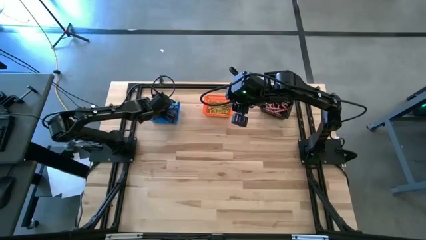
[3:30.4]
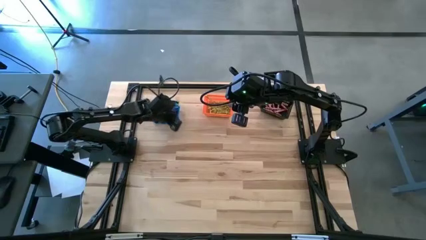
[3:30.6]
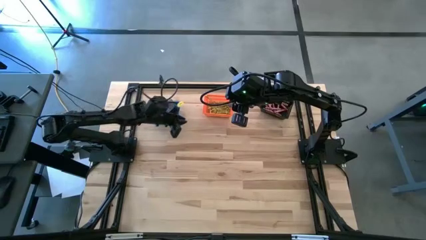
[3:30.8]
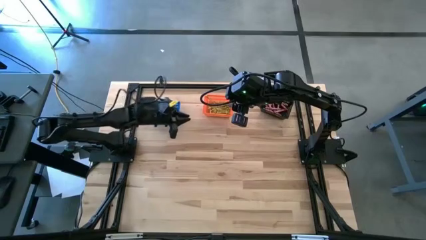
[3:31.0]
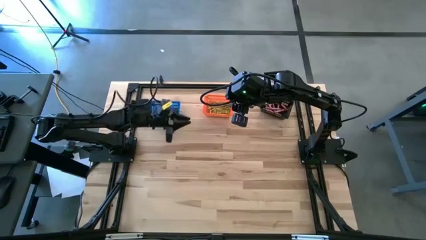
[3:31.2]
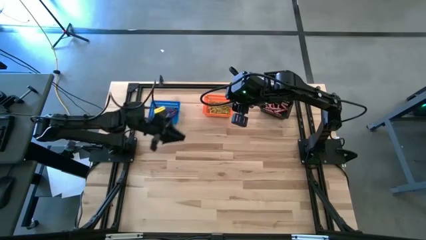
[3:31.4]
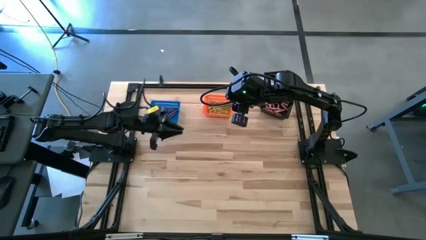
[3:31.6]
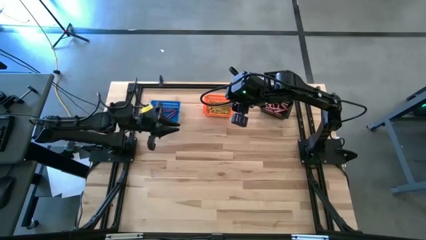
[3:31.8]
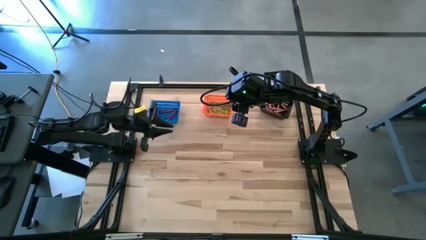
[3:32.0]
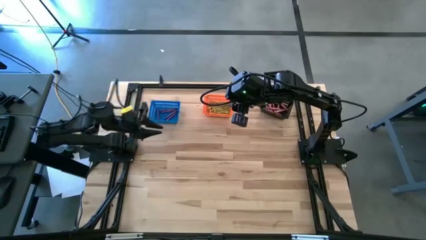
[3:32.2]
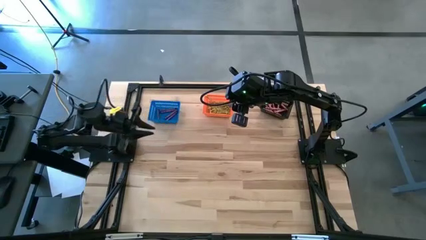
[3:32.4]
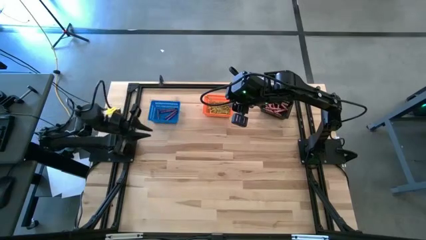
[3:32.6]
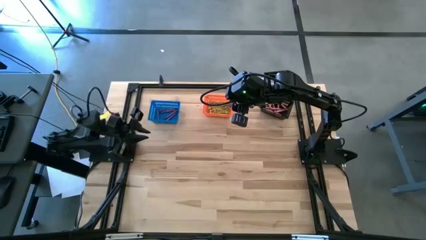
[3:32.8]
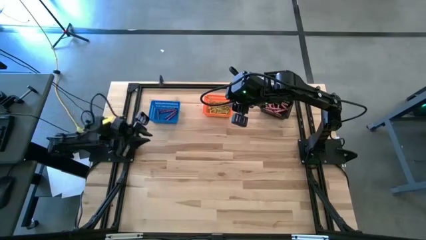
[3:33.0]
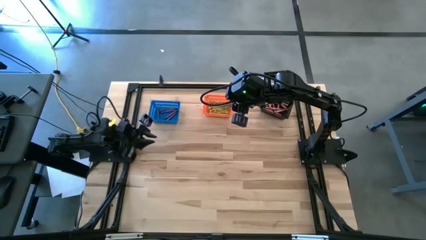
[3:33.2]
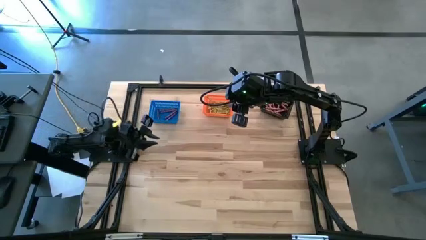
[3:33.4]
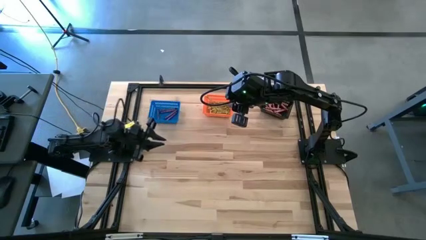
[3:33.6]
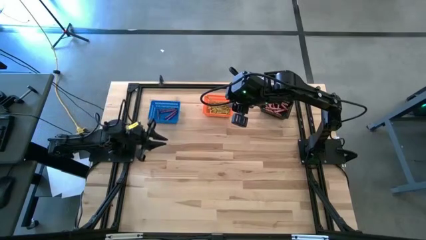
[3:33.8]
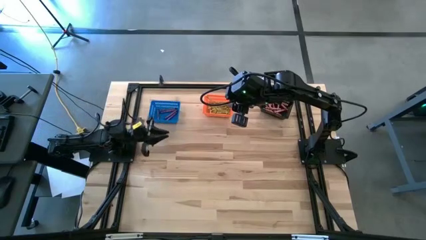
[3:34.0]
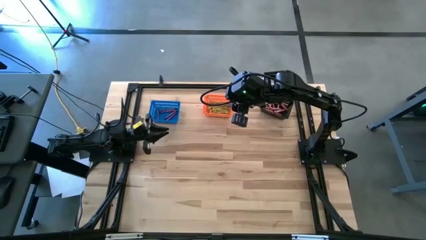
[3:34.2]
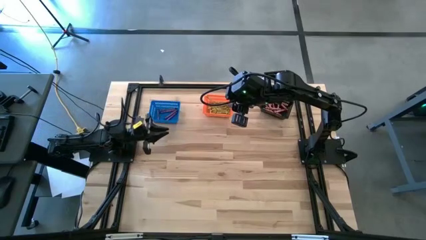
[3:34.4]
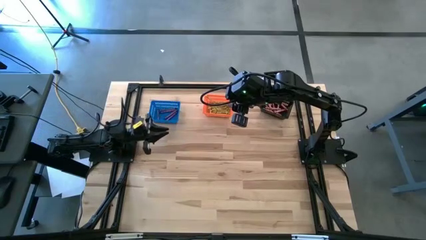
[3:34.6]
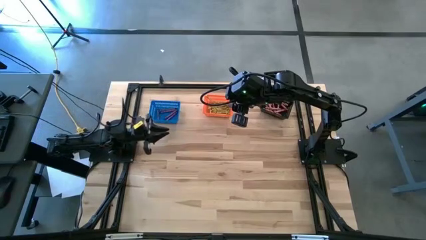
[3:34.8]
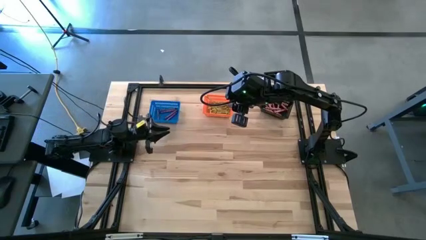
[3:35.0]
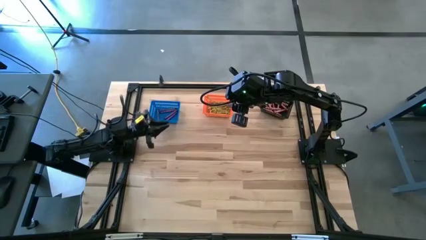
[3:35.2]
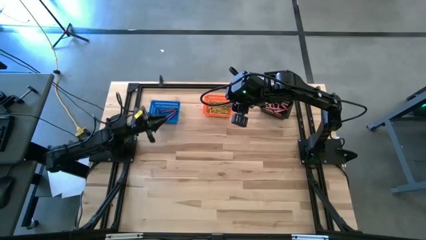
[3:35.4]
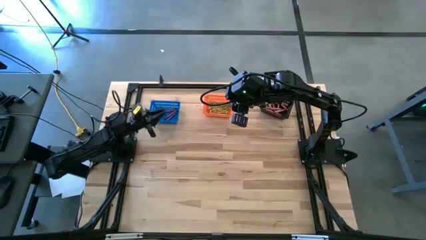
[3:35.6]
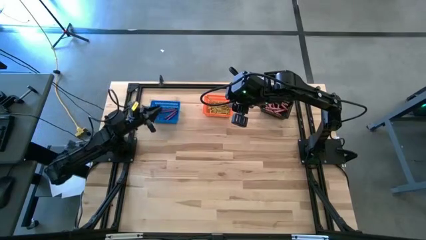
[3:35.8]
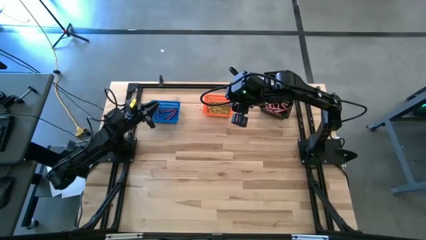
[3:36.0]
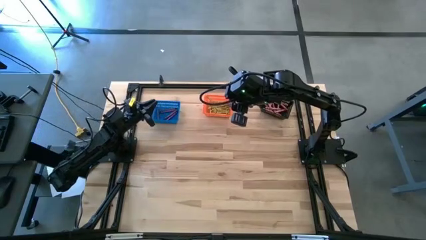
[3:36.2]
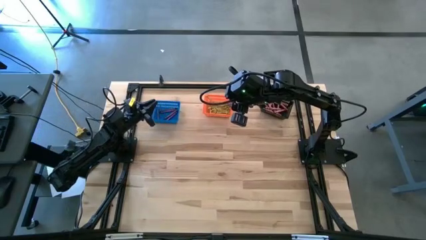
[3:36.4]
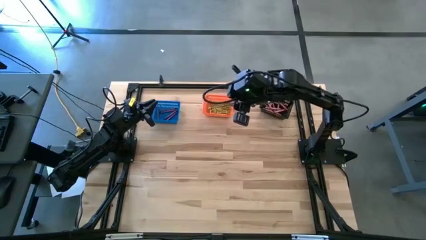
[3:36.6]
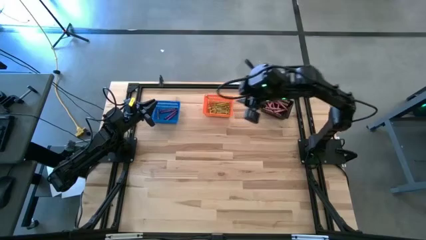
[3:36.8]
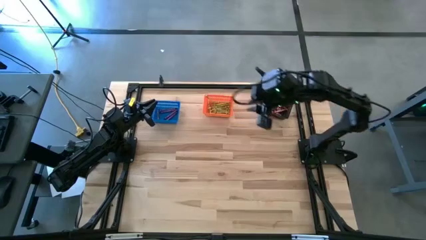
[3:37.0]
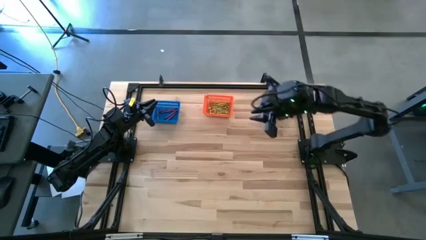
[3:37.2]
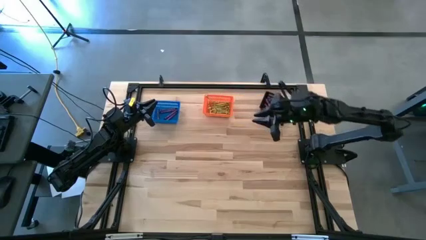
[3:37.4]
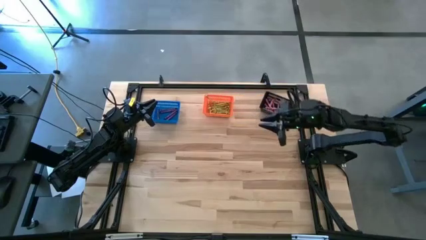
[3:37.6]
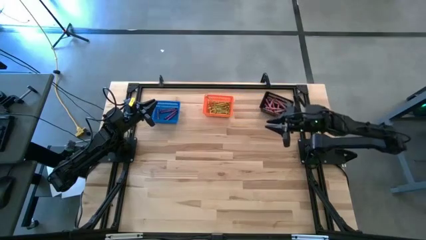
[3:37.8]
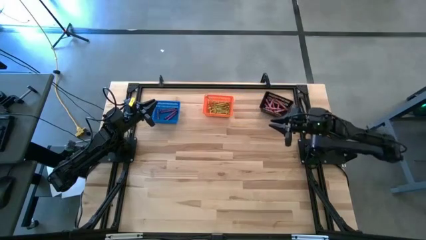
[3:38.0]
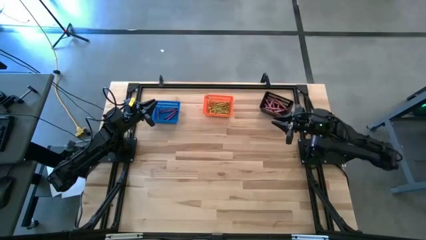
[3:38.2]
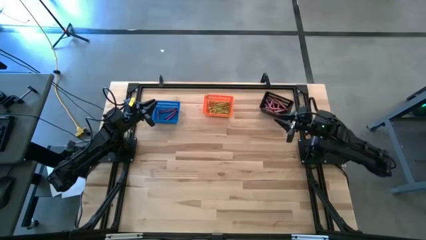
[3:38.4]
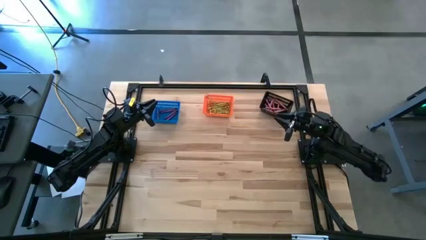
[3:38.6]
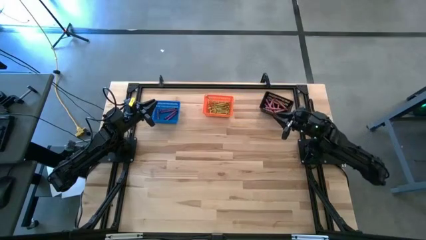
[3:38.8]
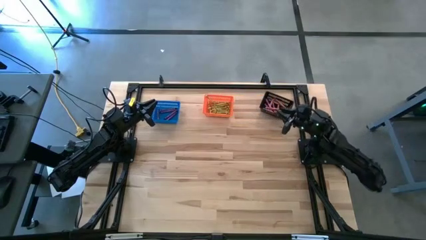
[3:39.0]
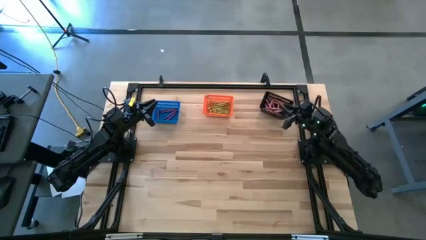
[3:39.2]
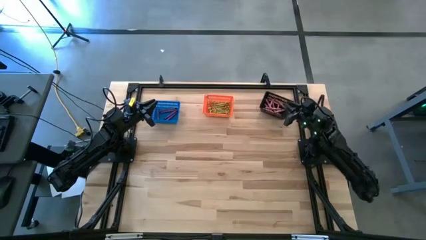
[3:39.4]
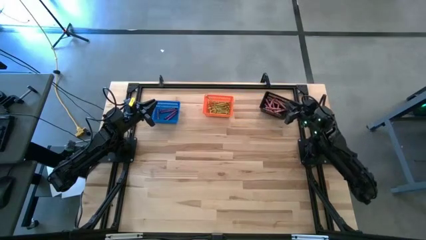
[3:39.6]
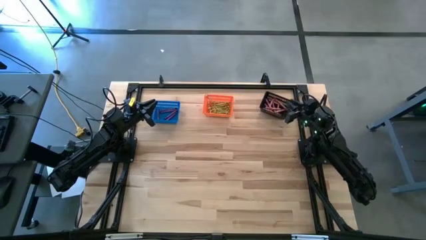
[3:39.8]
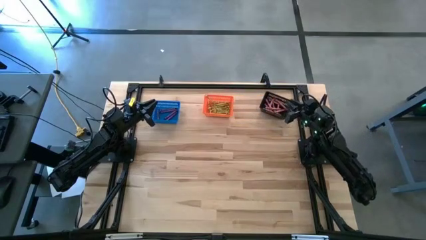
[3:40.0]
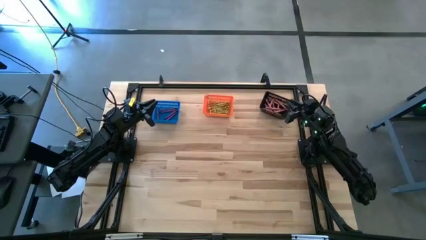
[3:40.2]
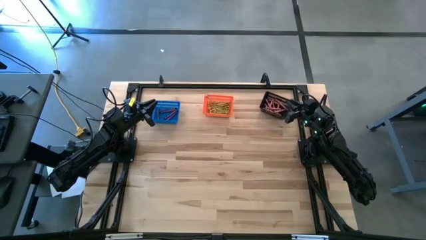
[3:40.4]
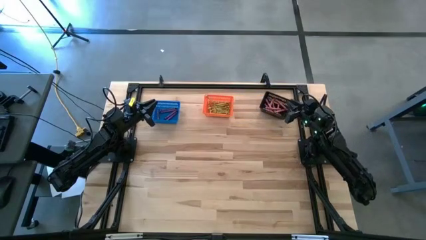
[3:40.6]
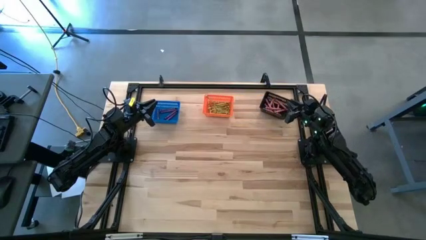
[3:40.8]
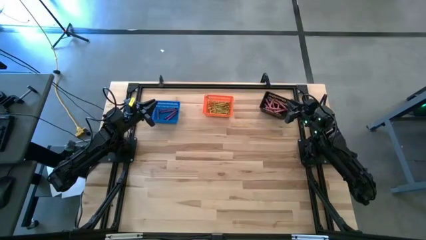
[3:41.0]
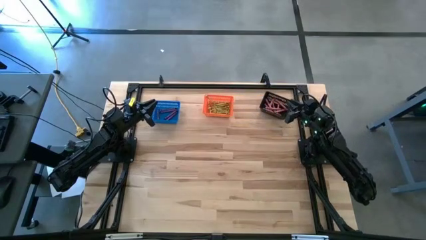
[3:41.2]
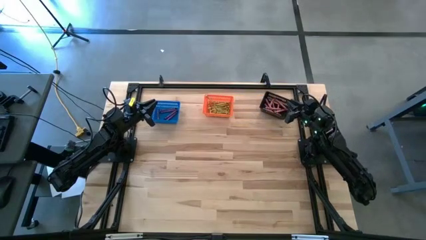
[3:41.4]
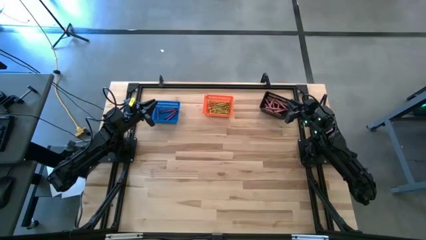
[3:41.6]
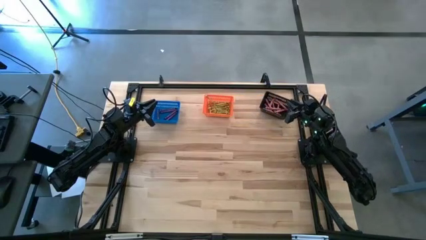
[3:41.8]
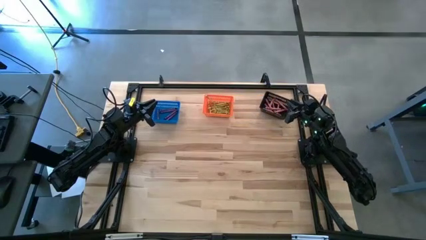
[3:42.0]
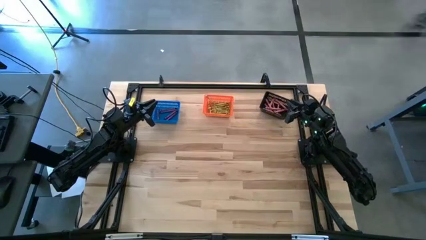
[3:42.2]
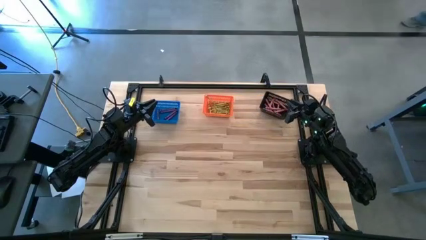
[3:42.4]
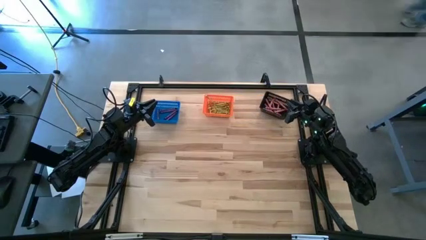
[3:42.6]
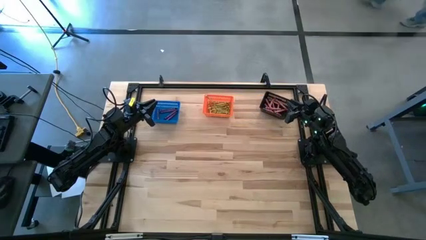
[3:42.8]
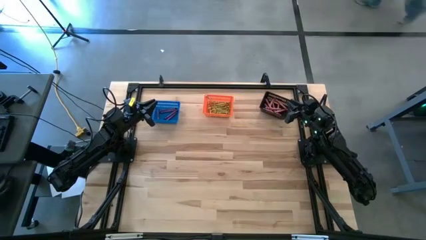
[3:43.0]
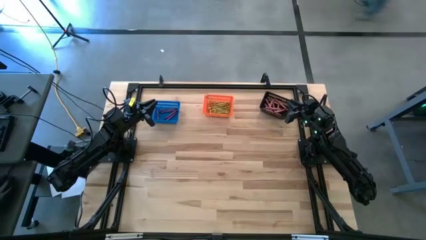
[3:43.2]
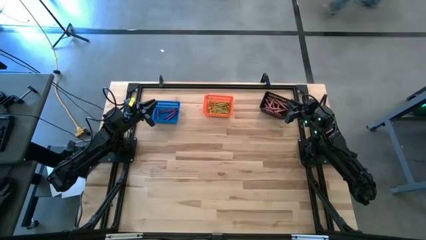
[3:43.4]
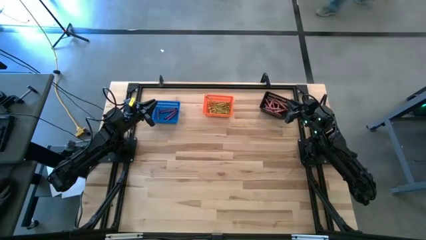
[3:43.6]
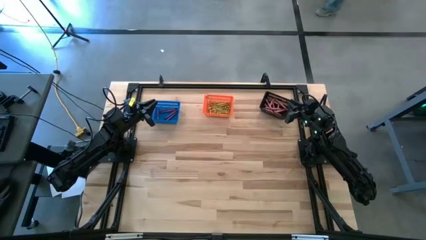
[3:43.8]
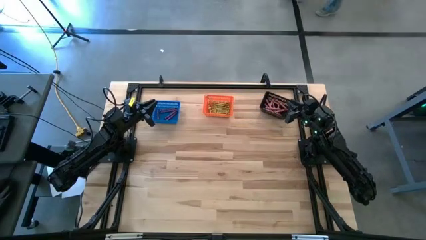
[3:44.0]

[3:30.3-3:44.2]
Task: Sort crayons
Return to Home Position

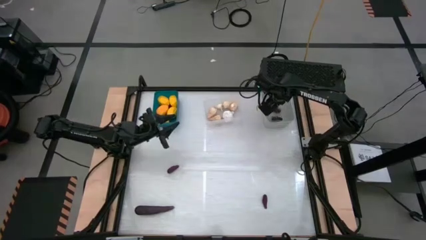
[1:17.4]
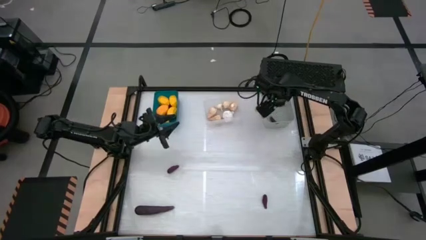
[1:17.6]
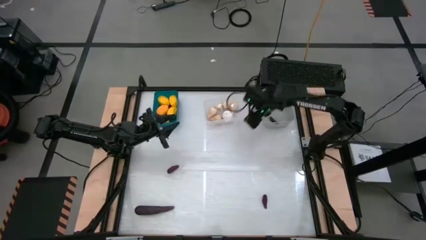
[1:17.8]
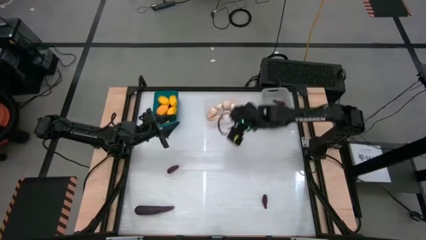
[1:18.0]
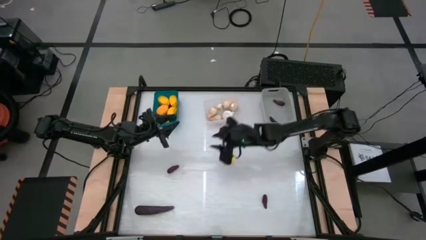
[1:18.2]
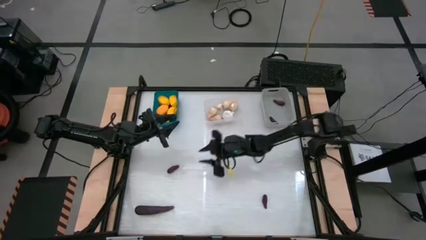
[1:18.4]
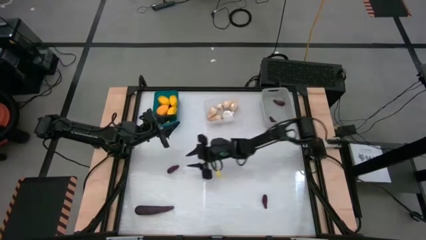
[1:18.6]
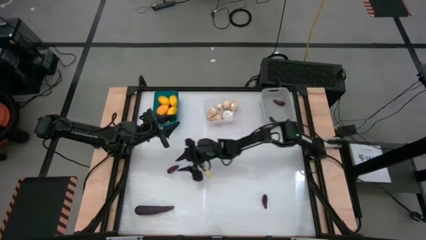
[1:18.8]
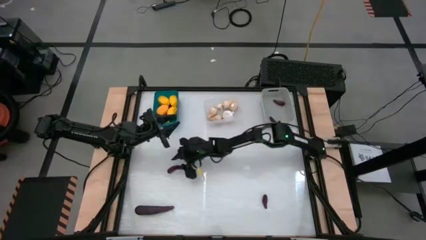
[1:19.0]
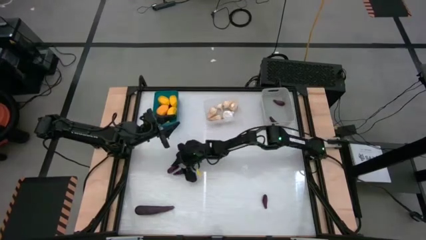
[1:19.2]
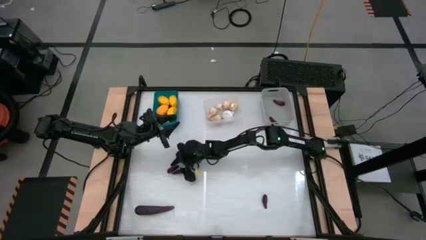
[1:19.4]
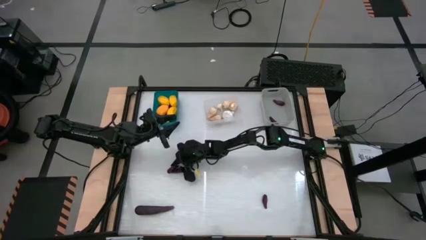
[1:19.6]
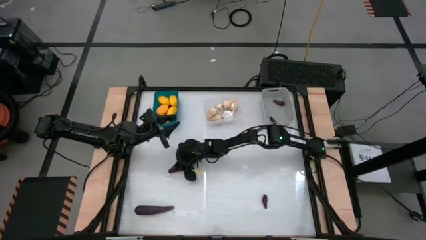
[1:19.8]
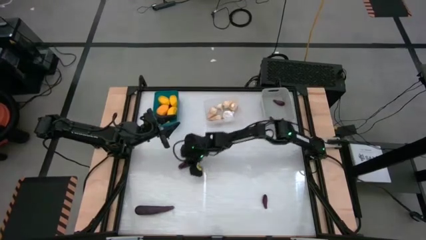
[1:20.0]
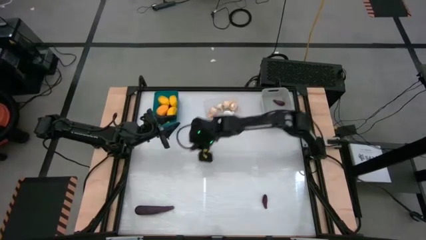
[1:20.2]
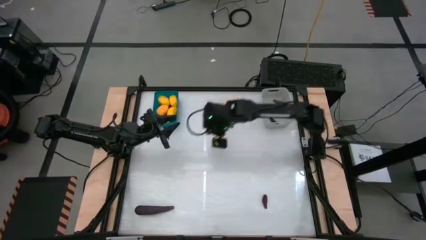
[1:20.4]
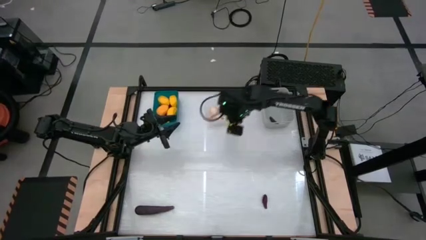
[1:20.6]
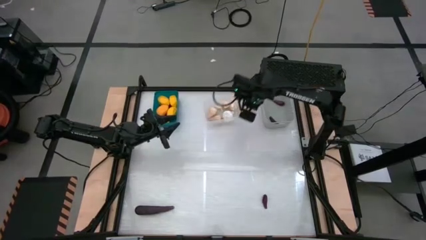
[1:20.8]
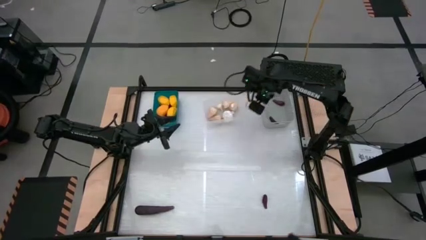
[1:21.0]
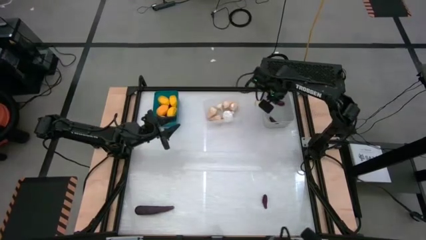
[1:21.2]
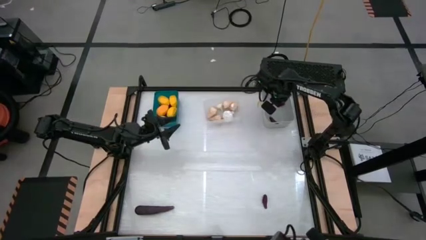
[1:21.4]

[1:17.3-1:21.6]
Task: Sort produce into baskets
Put the eggplant into the gray bin
